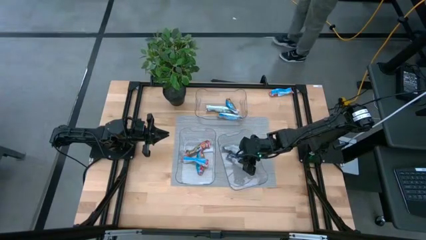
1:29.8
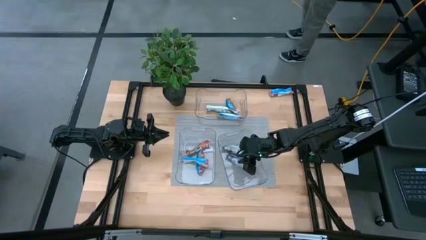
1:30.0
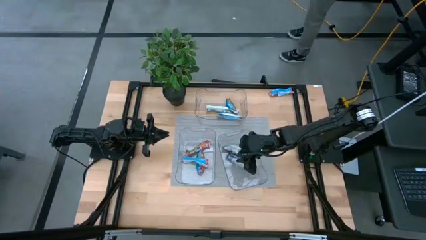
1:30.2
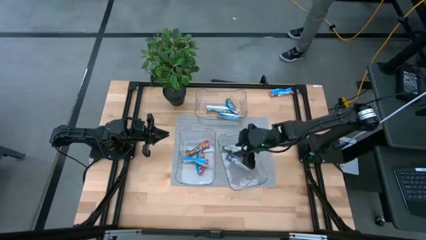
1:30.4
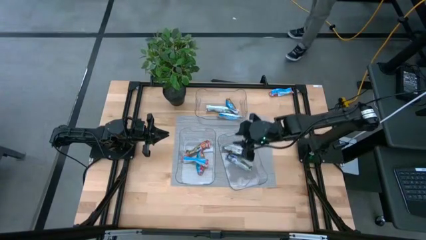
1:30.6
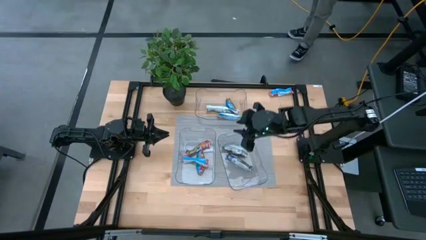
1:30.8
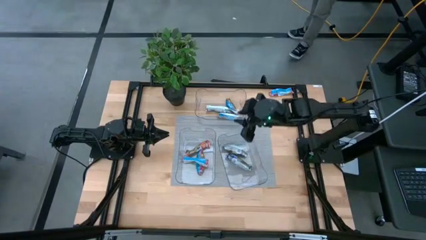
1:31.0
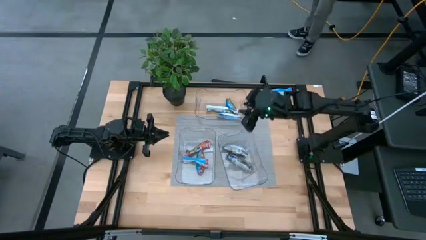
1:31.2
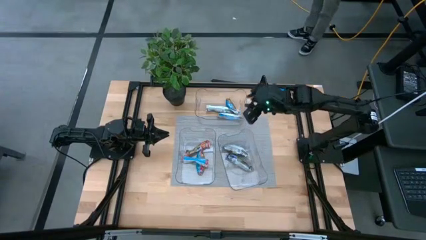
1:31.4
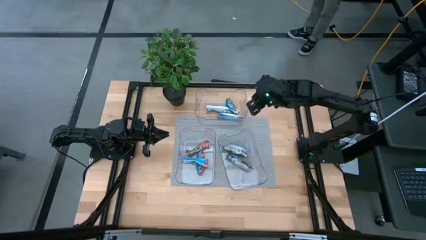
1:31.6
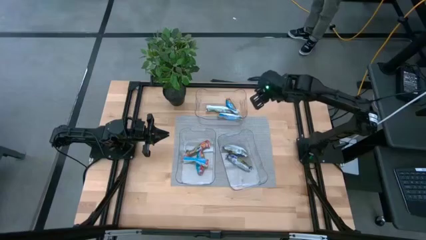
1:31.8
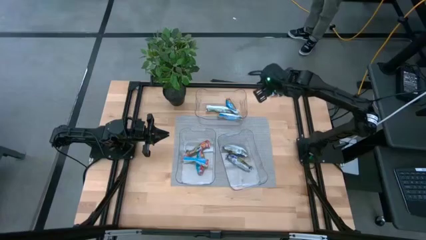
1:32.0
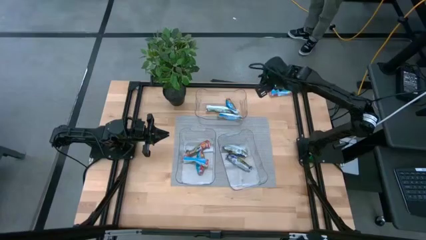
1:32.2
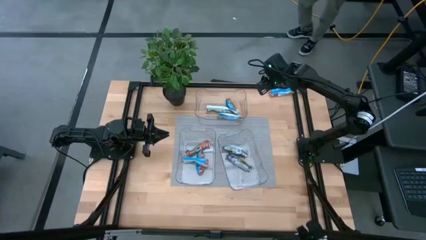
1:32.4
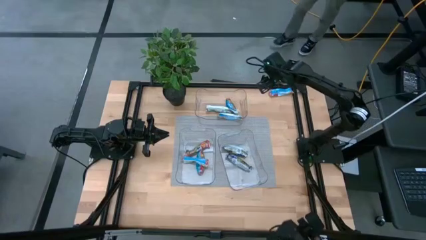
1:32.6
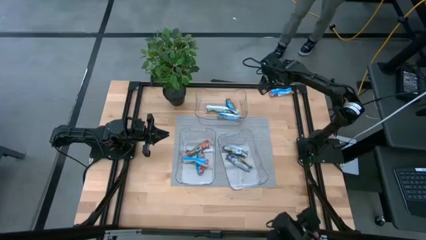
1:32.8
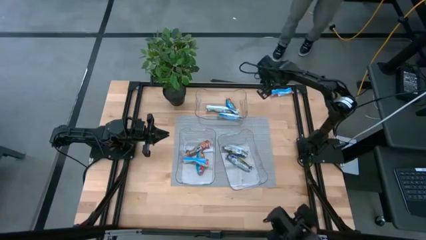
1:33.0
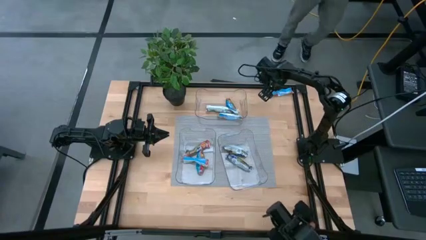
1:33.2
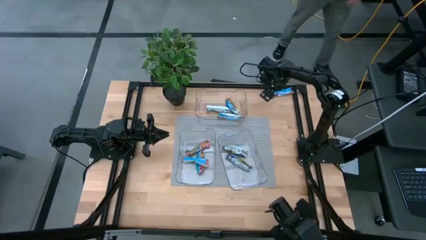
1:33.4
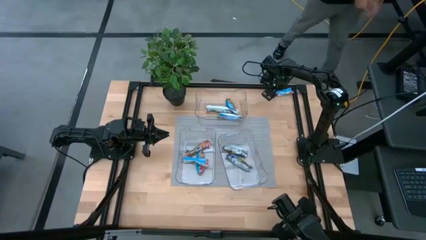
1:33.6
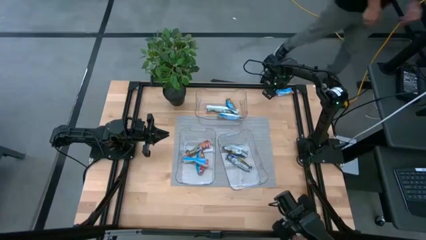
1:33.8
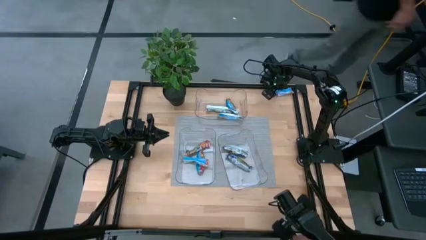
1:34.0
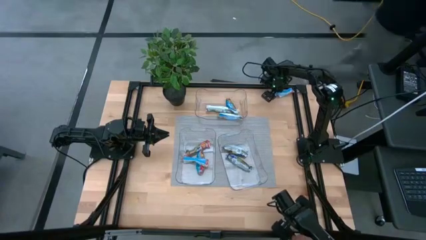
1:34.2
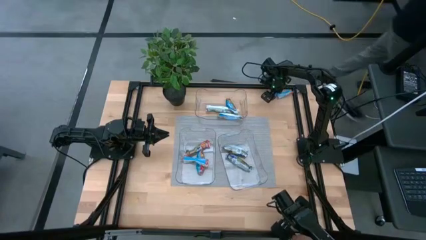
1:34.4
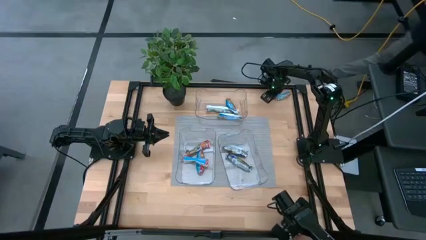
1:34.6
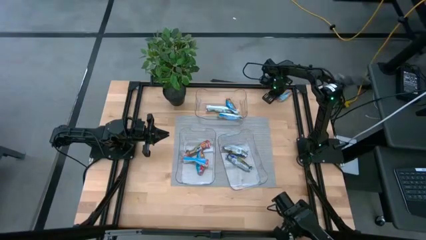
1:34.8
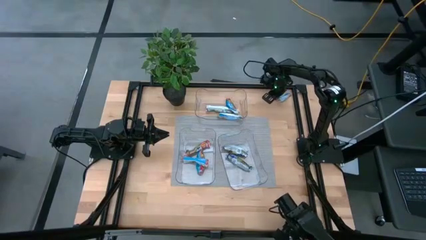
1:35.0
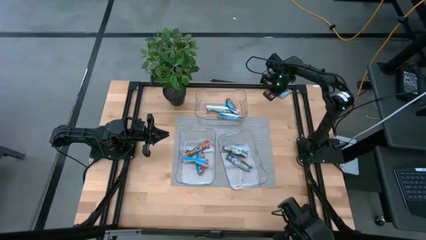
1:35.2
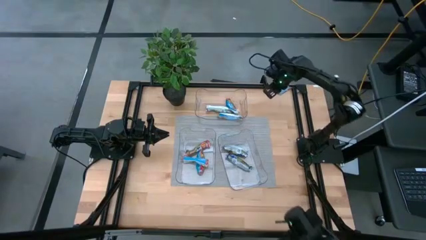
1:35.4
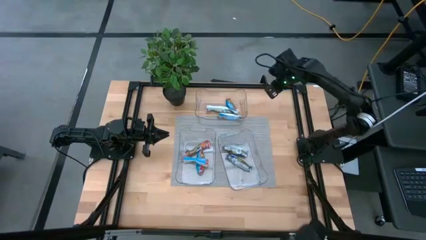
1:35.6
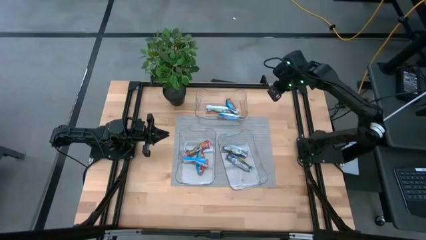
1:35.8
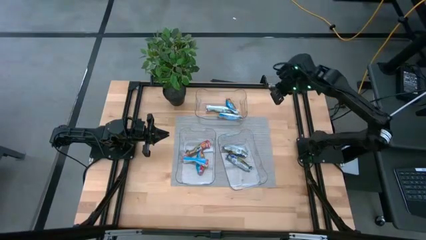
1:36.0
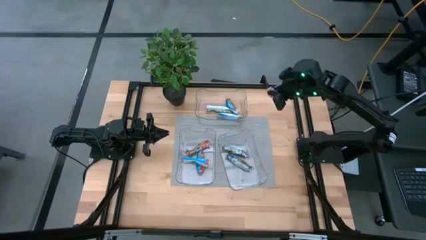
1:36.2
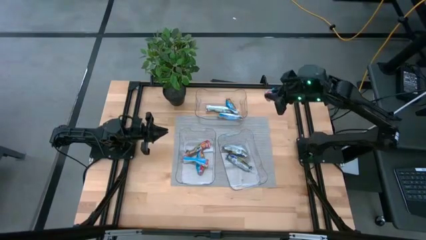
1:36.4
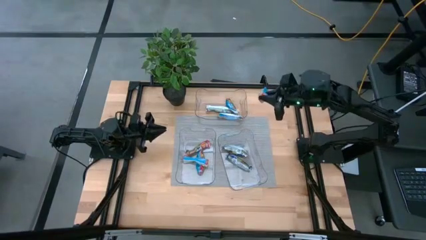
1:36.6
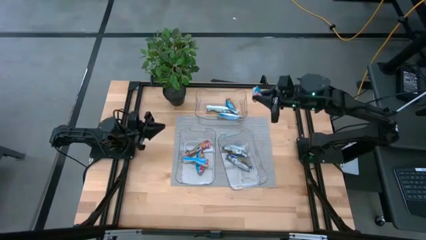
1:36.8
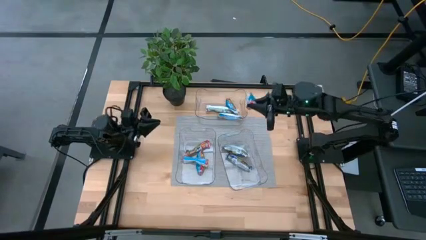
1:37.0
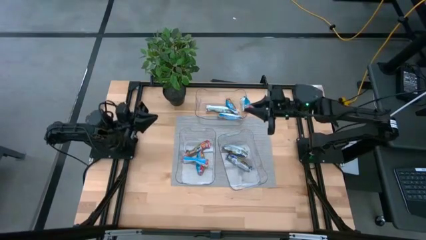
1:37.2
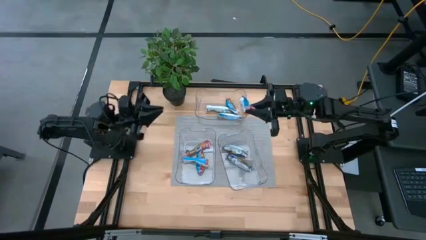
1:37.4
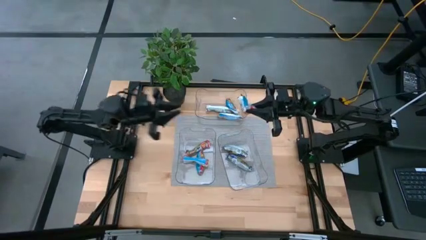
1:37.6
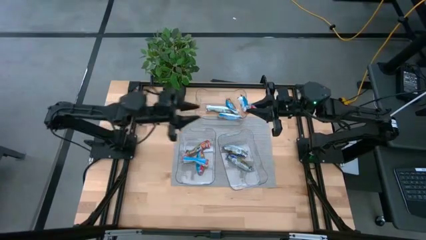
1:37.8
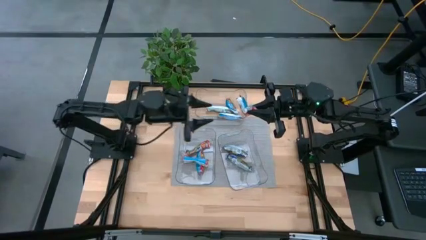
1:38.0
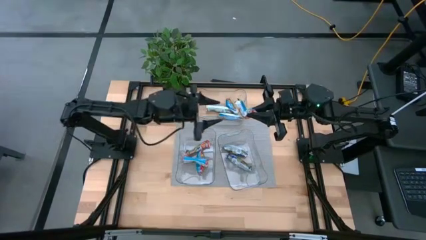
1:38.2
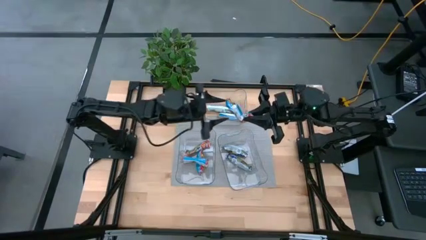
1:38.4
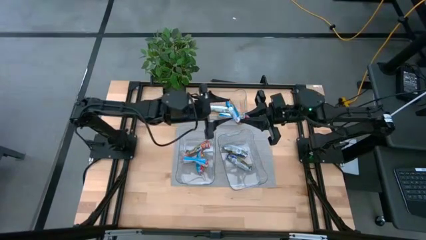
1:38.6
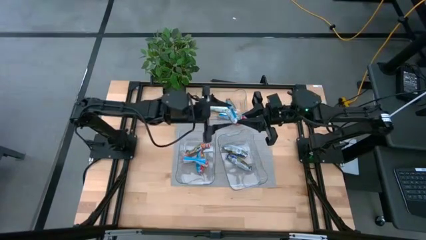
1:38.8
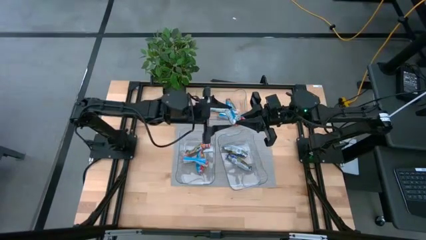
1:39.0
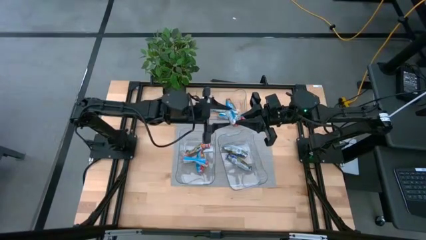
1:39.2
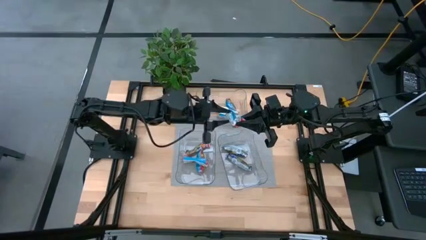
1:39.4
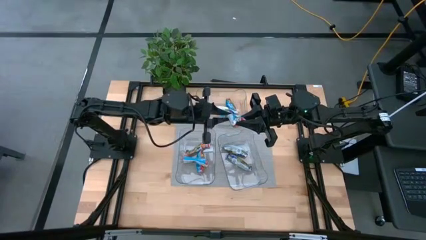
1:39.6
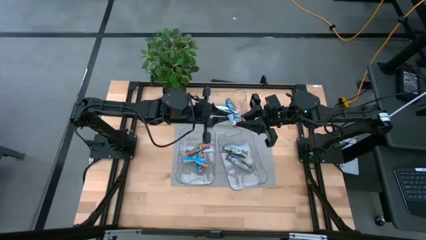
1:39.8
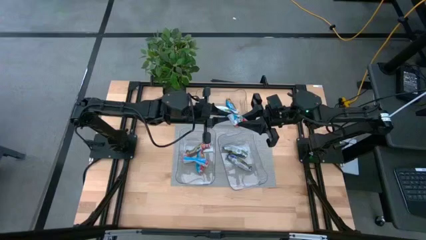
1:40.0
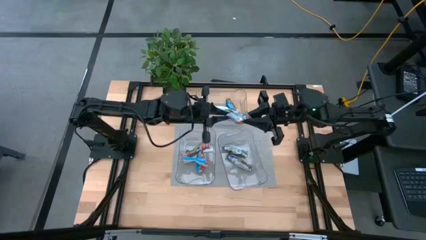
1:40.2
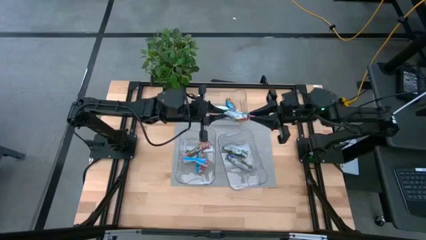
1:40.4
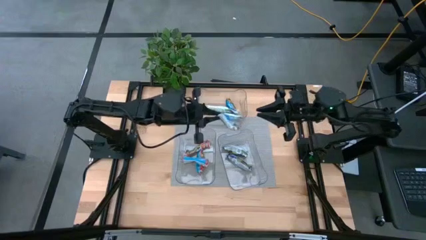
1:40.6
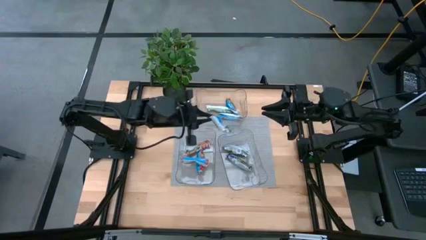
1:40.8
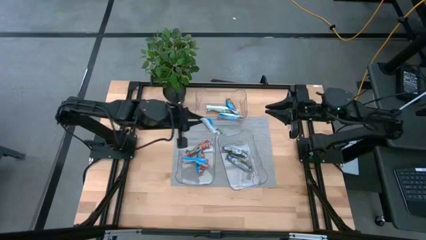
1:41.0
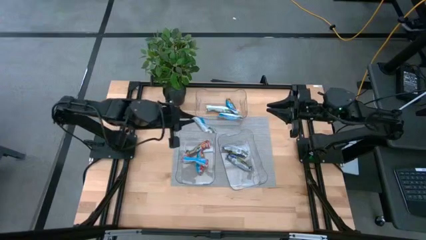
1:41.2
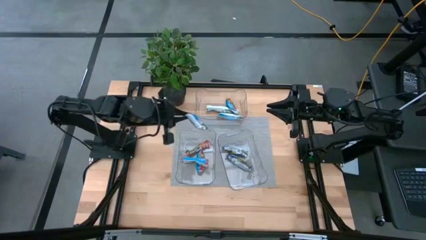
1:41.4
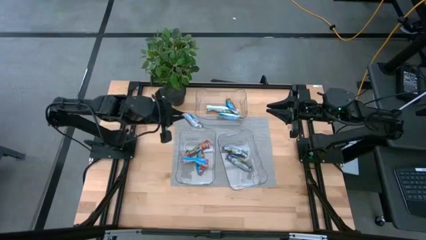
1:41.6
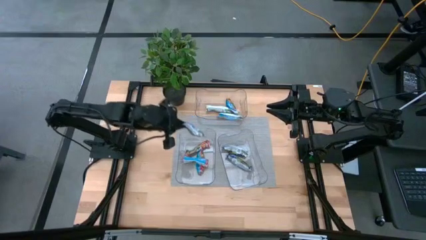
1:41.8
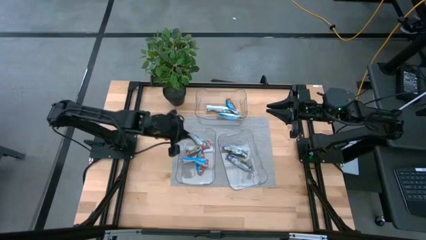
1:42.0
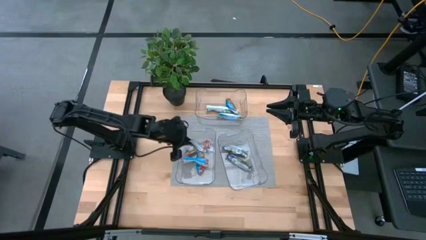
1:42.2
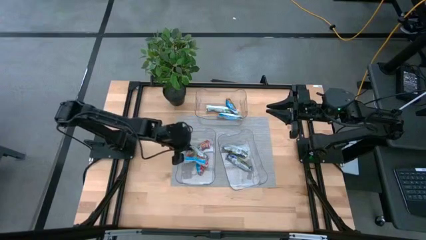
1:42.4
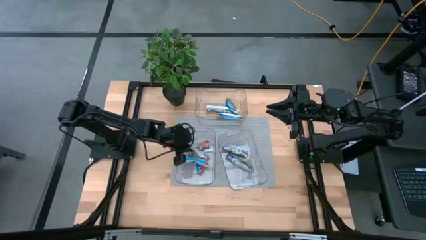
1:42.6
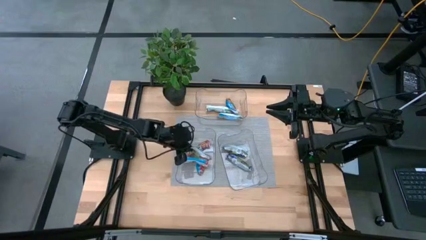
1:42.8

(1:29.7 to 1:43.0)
Task: Pick and place Granola Bars by type
Put the red granola bar into the bottom left transparent bin

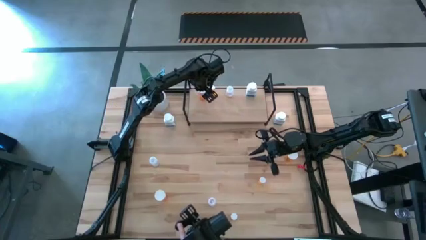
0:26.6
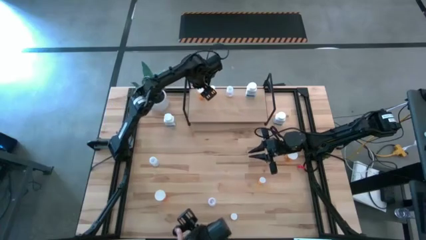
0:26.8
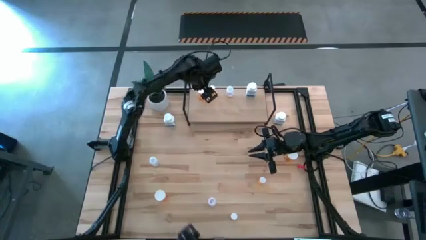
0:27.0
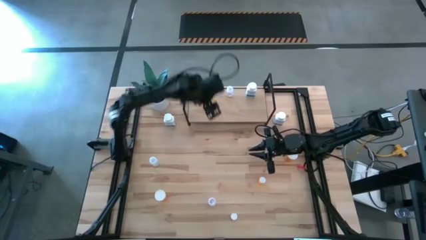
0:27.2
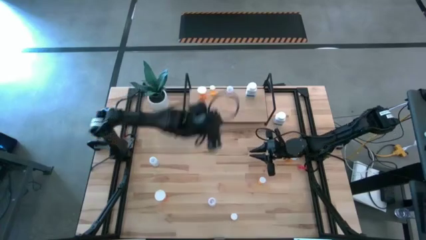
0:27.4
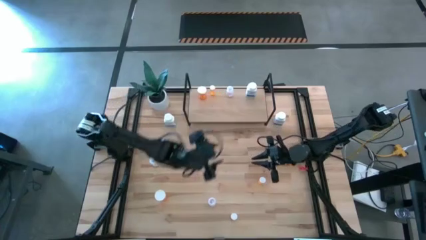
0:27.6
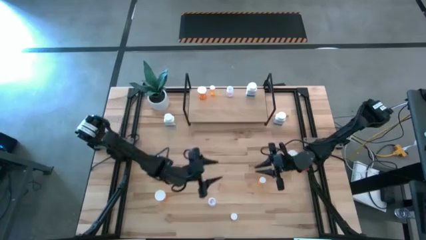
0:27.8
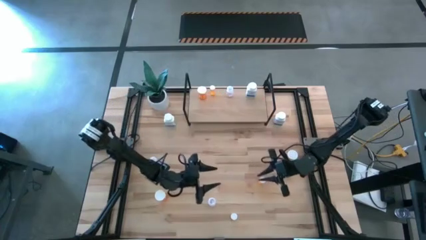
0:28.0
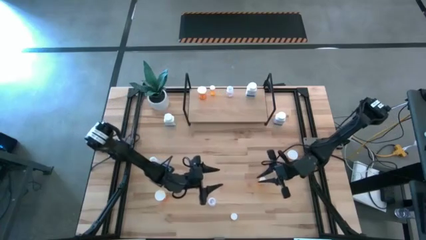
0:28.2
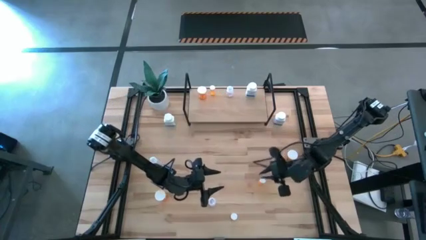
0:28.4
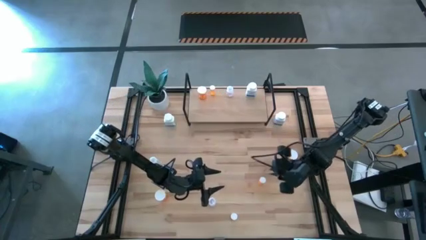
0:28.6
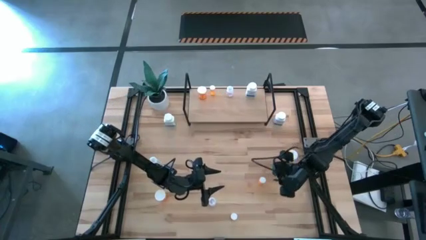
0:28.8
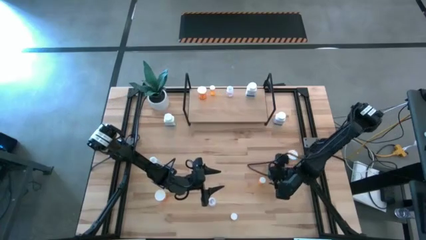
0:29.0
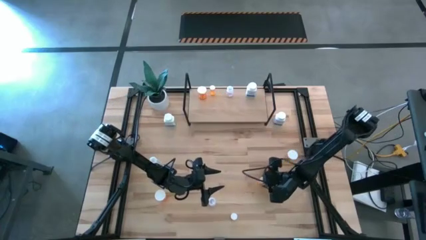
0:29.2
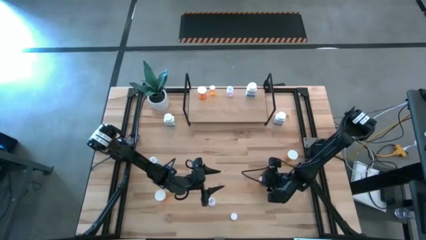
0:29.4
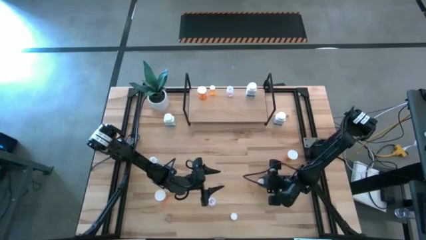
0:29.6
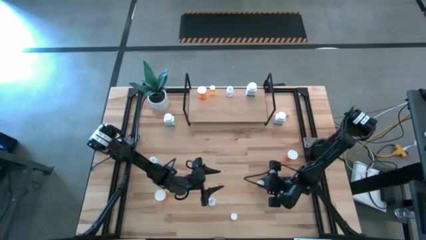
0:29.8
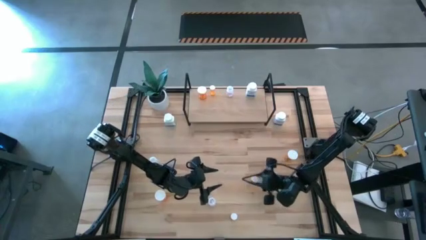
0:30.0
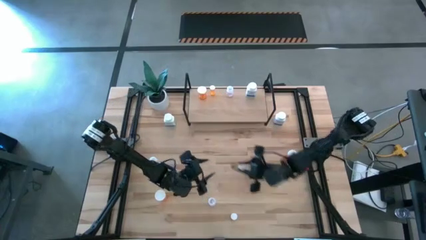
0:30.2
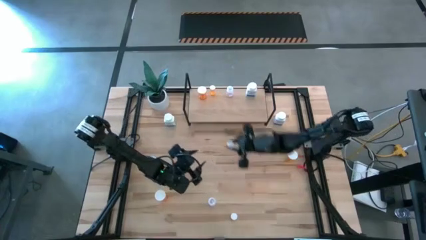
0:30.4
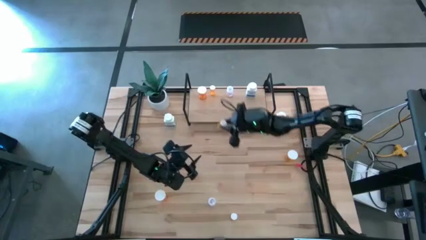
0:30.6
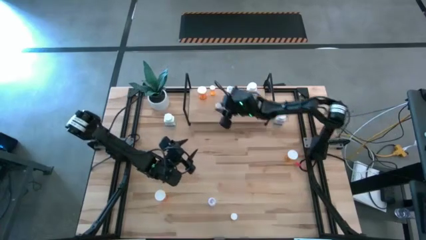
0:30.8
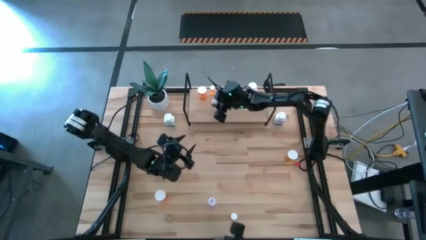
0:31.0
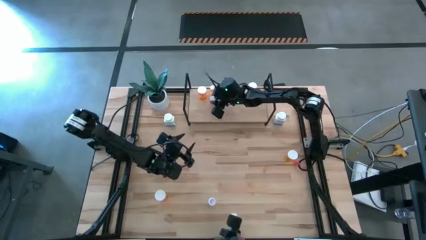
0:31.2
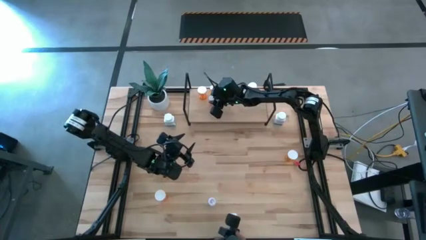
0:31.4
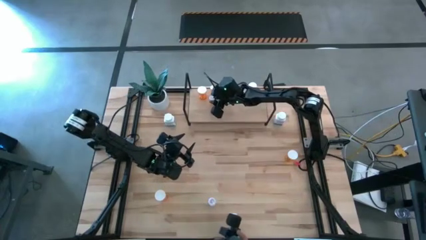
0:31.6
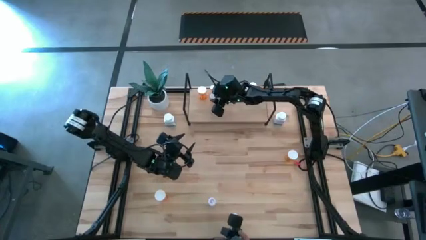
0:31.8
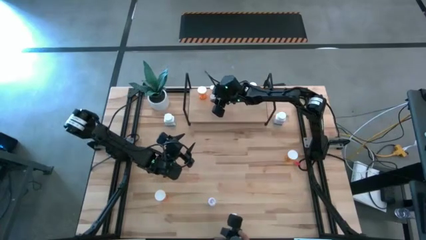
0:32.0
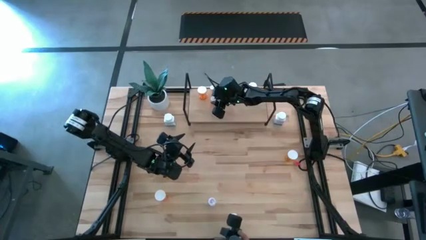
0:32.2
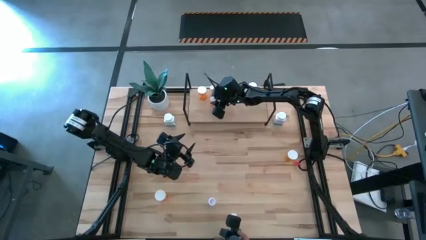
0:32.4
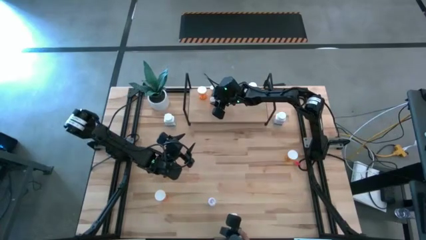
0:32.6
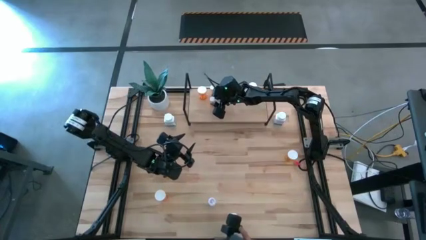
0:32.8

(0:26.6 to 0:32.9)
Task: Pick and place medicine bottles onto shelf by color
Put the top small orange pill bottle on the shelf aligned with the small orange pill bottle
